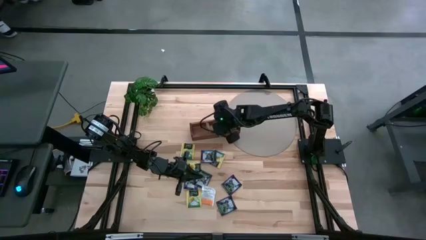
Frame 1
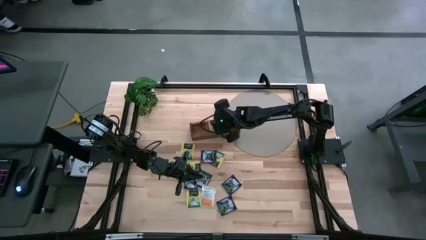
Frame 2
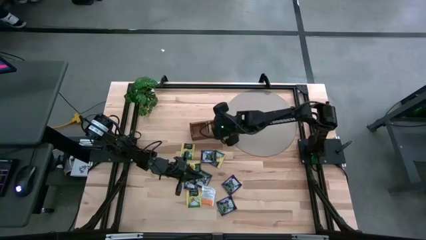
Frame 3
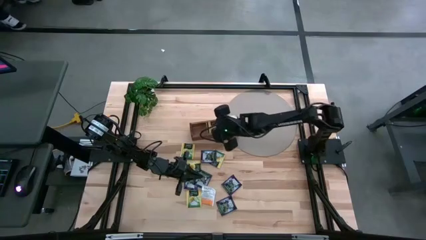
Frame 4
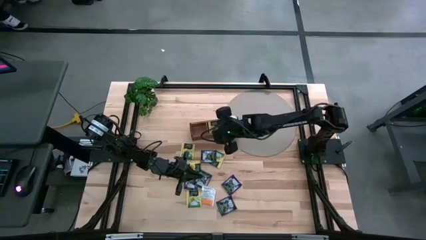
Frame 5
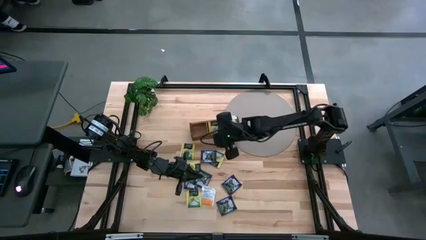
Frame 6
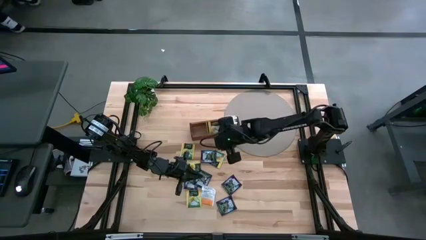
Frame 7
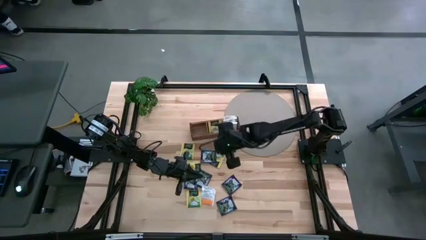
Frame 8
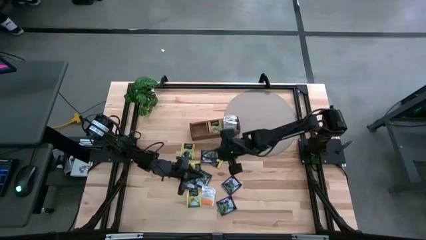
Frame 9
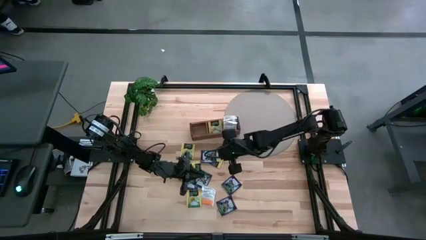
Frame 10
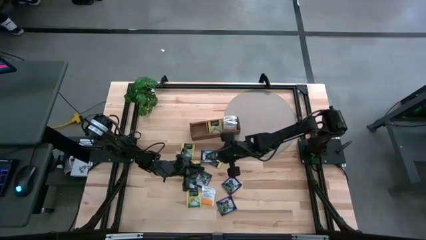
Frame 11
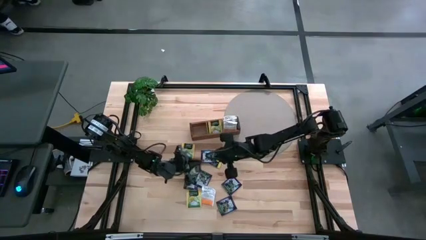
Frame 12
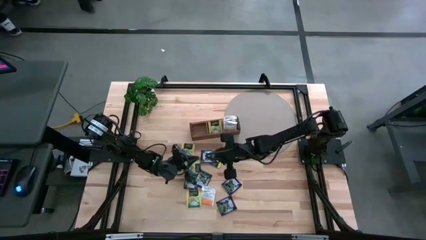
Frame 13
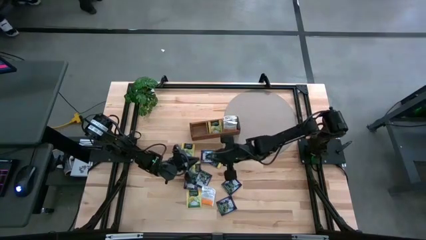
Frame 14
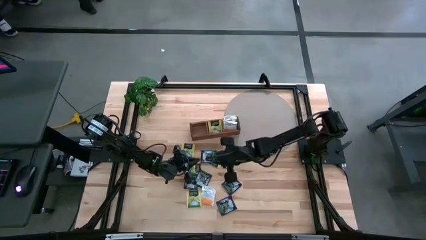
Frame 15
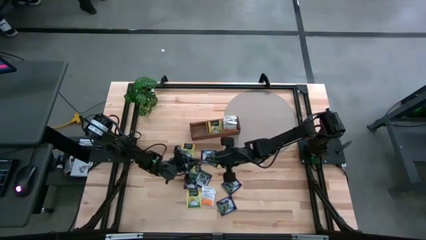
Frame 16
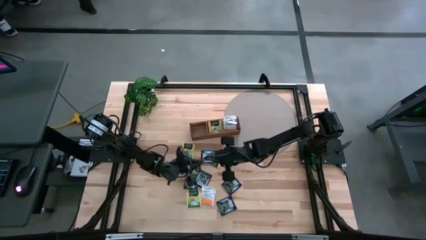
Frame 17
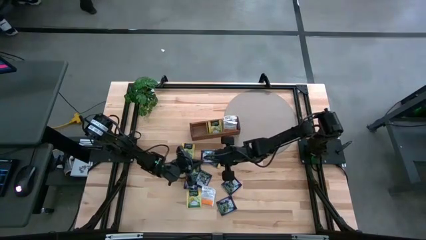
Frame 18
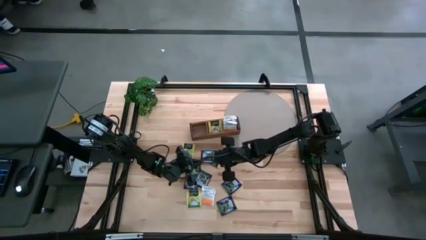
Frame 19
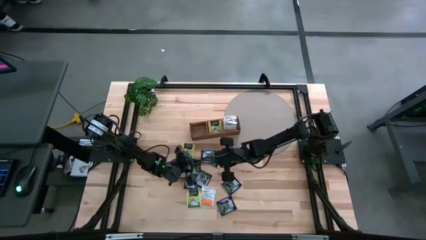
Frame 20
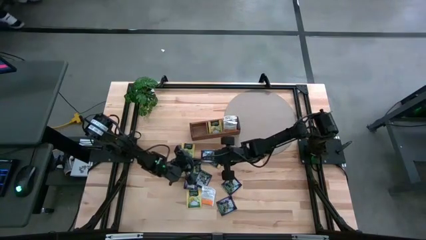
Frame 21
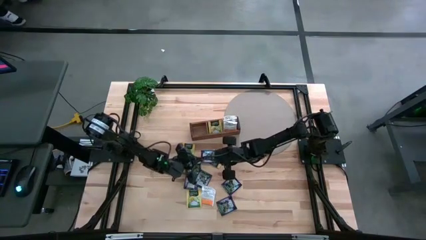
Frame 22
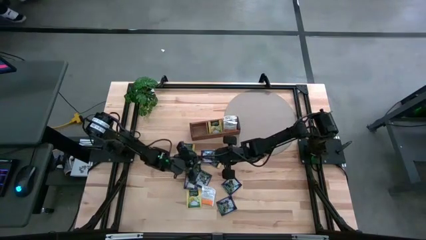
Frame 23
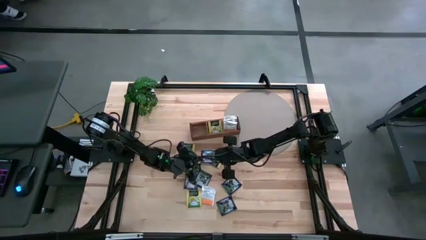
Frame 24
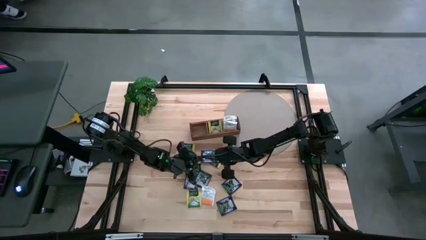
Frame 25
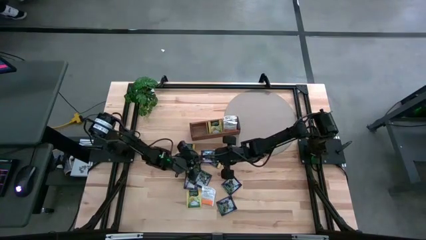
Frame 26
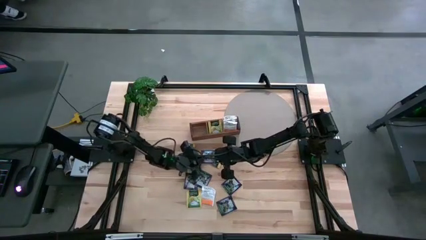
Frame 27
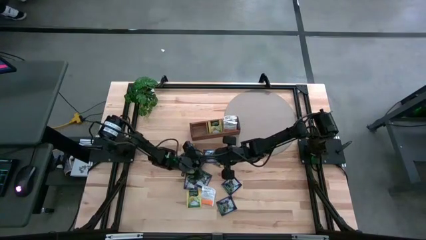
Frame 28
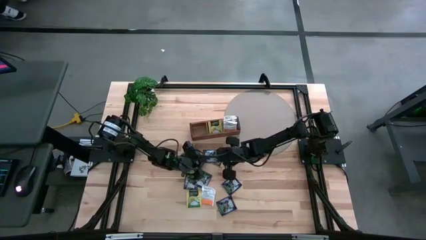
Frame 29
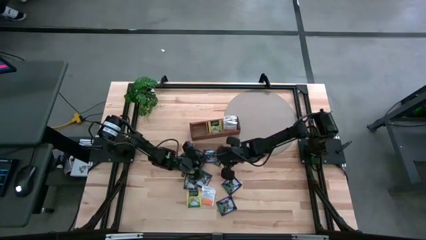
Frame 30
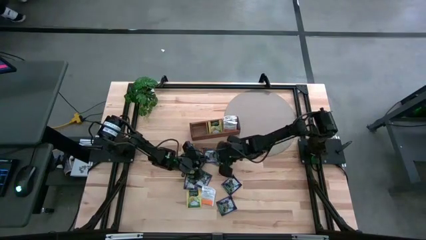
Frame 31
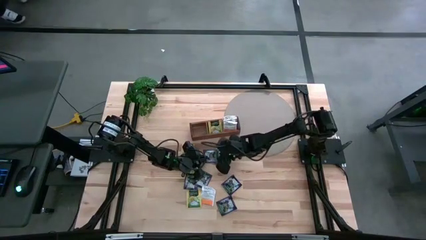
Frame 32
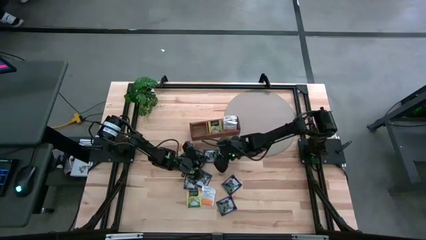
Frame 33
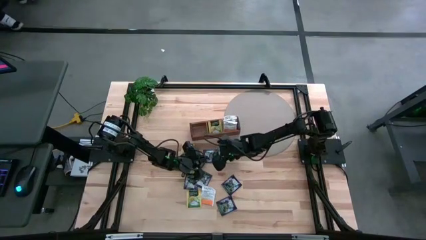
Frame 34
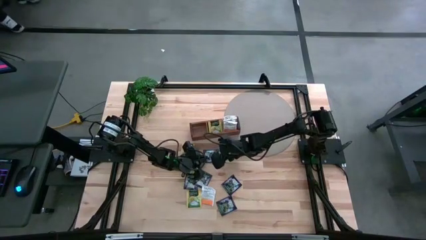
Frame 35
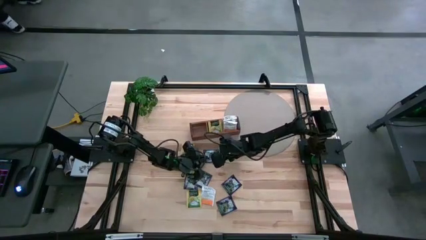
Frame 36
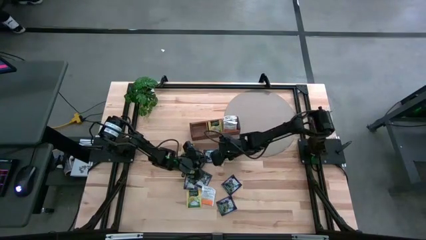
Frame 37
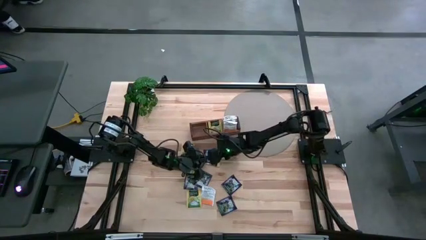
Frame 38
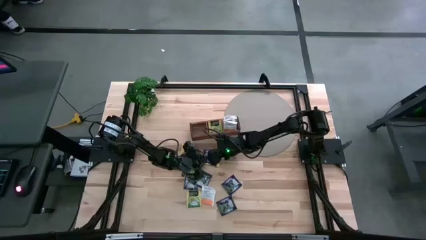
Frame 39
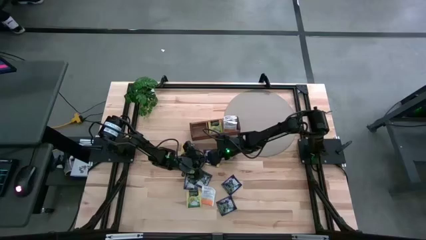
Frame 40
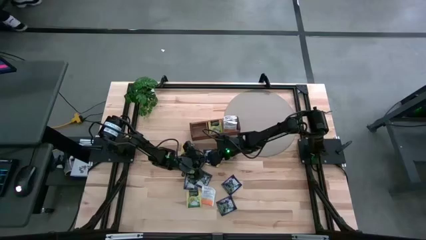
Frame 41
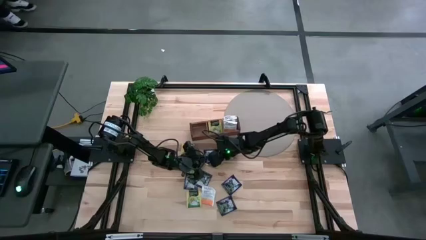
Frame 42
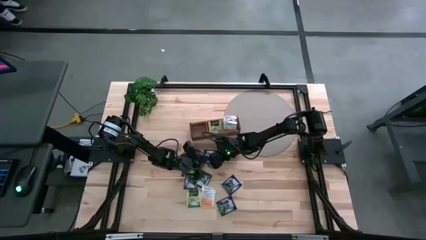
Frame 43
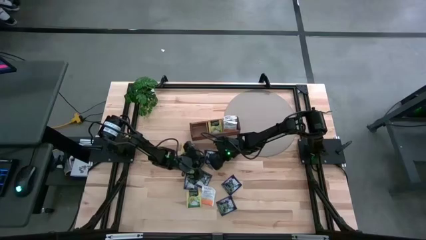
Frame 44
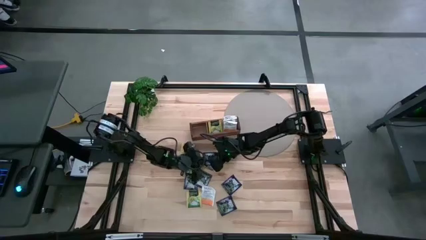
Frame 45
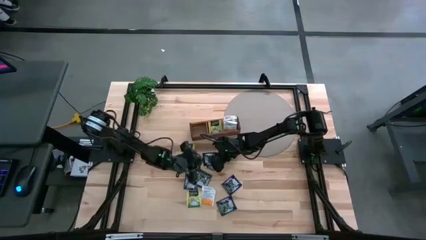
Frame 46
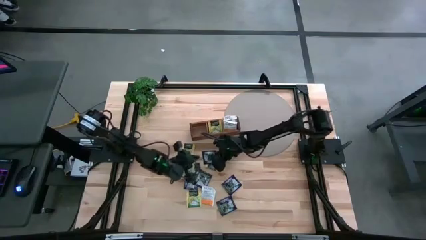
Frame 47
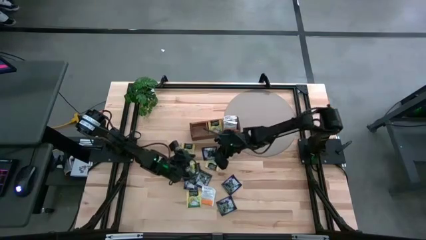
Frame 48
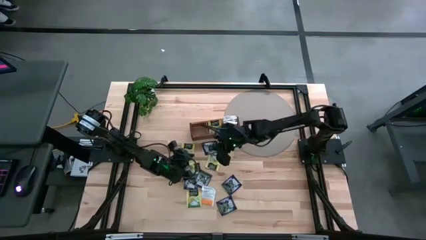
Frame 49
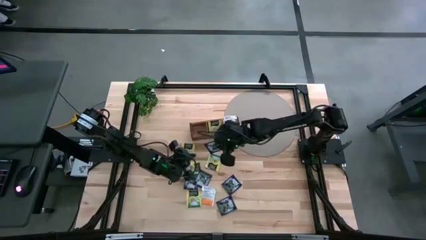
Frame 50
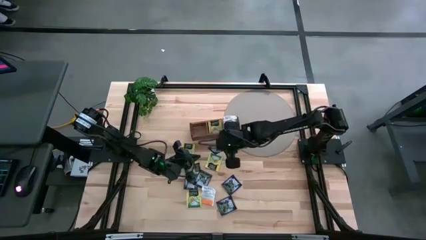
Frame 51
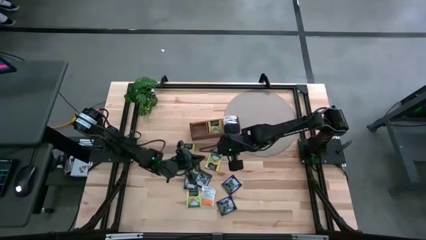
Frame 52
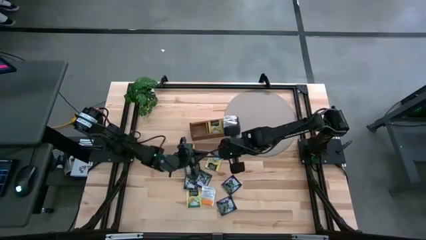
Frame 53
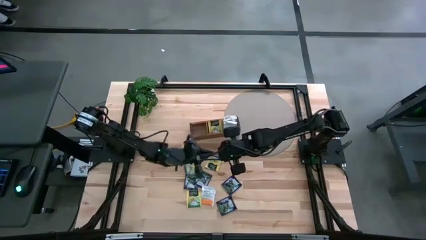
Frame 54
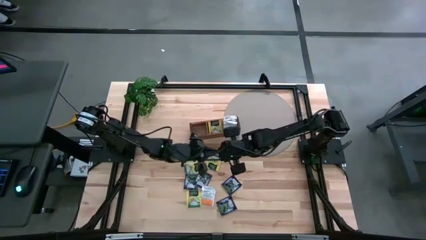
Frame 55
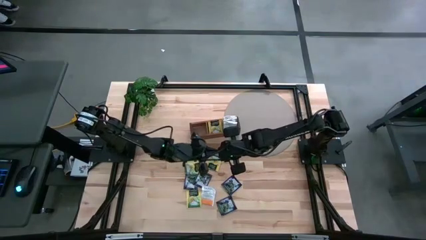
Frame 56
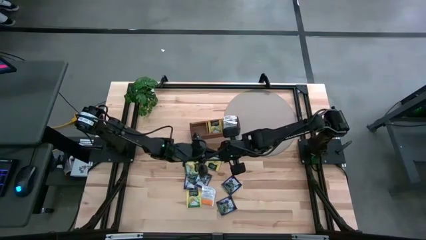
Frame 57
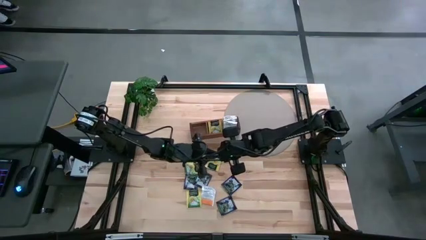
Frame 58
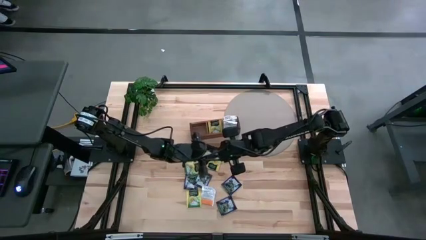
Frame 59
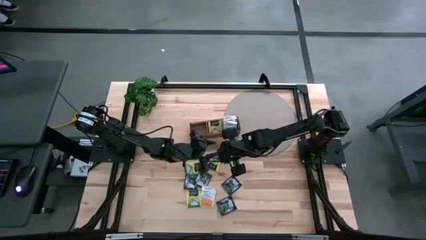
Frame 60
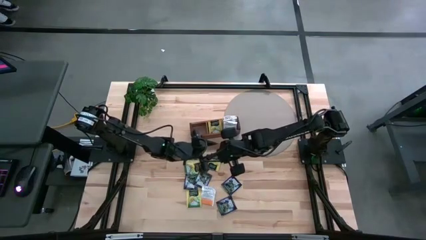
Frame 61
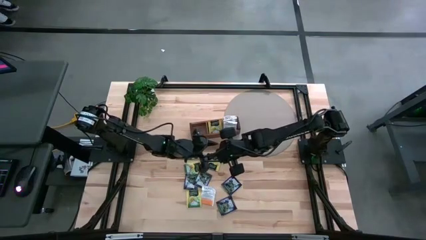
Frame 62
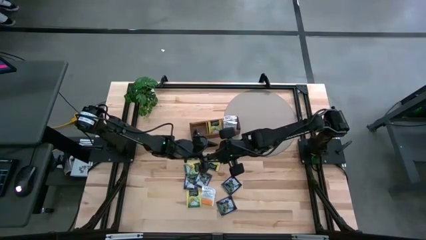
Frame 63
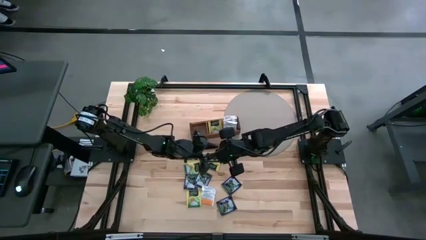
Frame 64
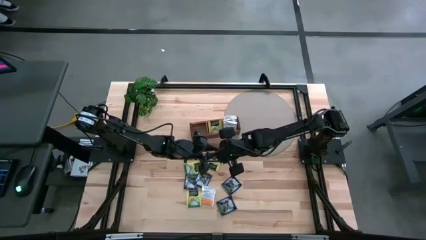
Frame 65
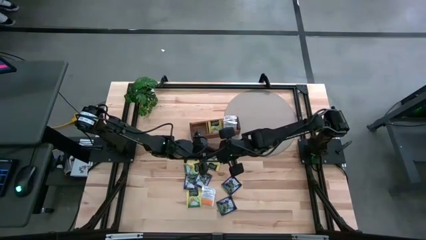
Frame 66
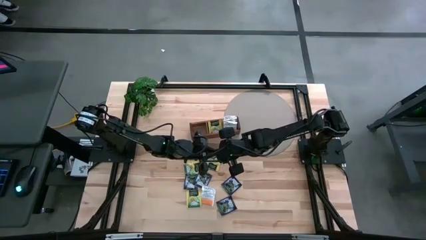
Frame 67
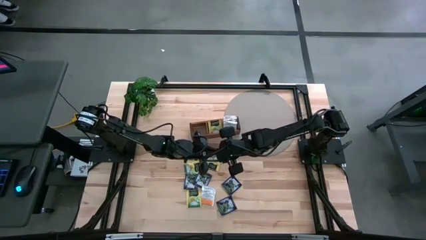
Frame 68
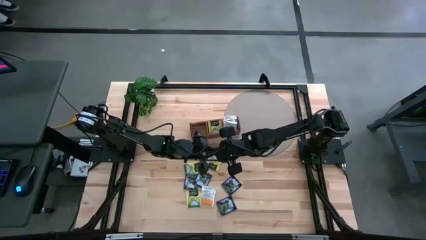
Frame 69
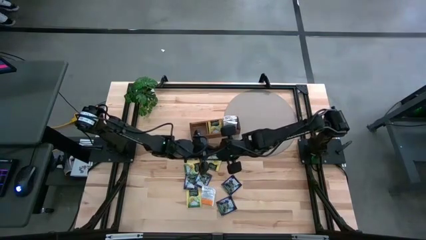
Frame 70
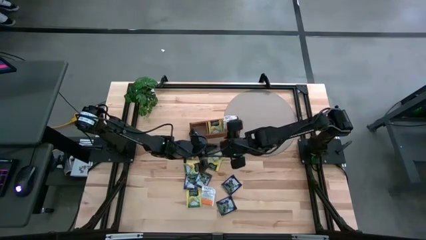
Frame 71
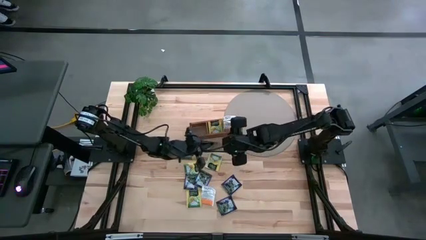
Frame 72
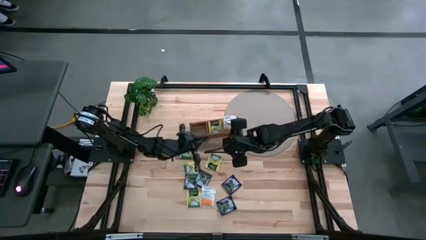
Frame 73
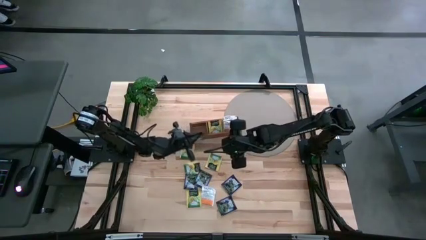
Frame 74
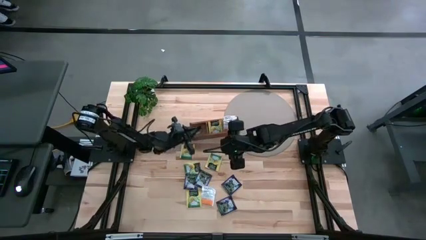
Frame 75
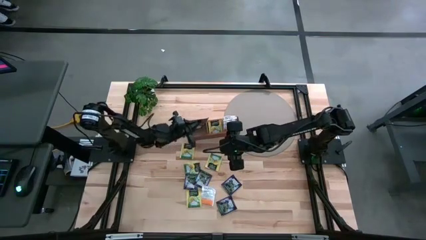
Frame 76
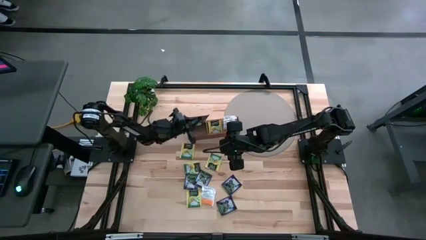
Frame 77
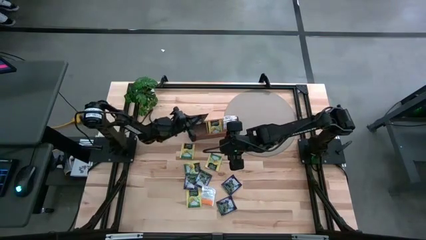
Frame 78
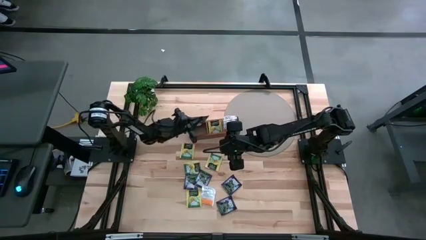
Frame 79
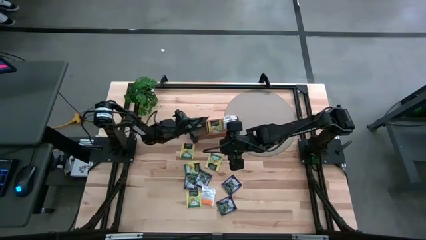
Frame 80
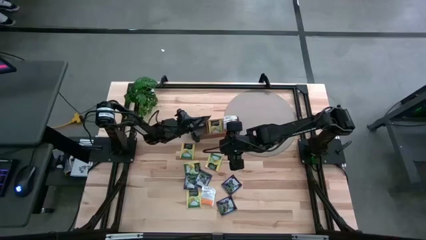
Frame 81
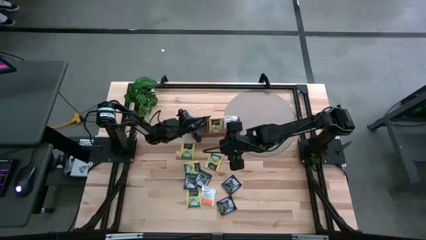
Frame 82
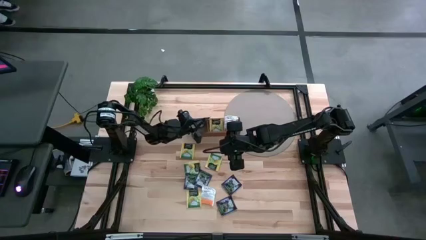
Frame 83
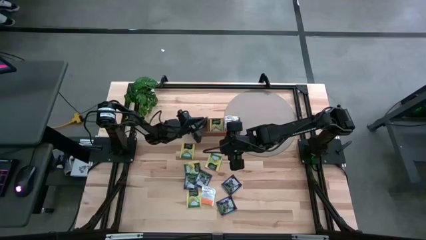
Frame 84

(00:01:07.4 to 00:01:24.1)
Task: Pick & Place Tea
Put the violet tea bag into the left section of the wooden organizer
